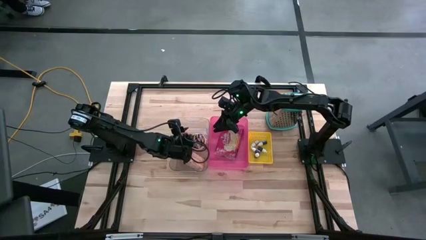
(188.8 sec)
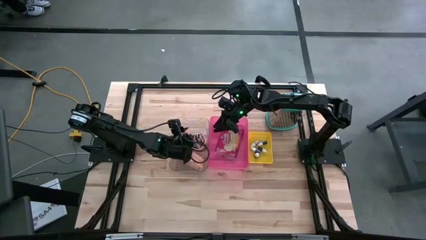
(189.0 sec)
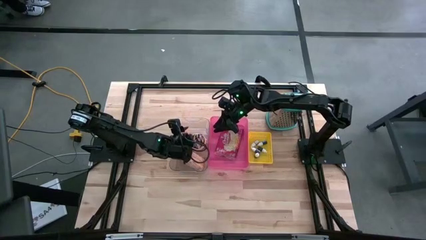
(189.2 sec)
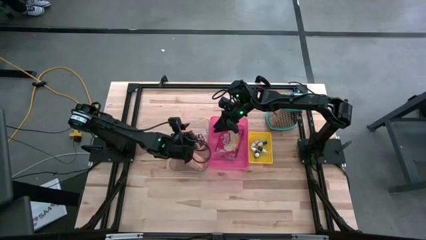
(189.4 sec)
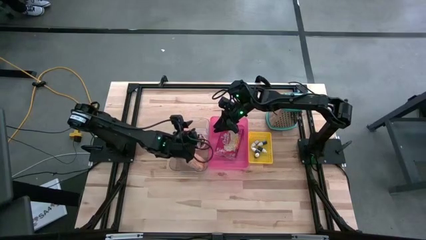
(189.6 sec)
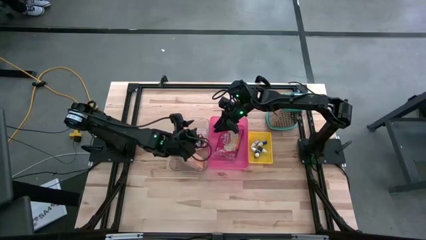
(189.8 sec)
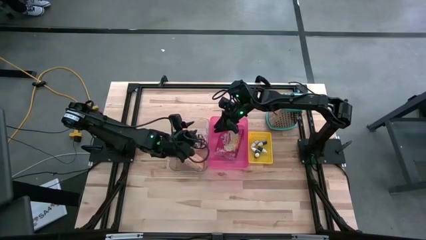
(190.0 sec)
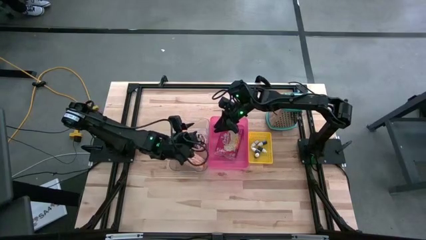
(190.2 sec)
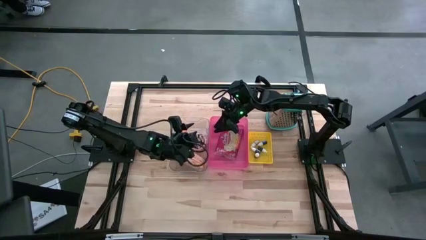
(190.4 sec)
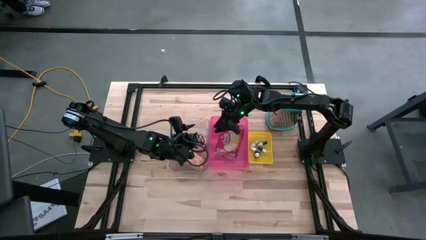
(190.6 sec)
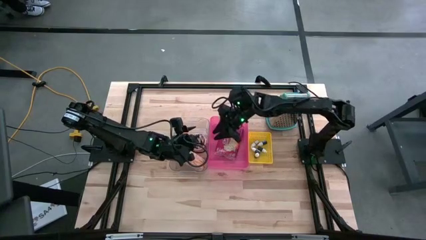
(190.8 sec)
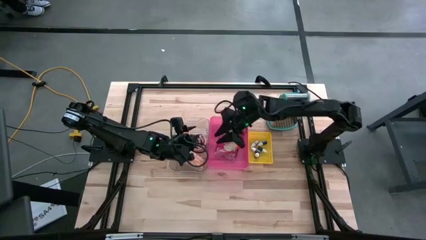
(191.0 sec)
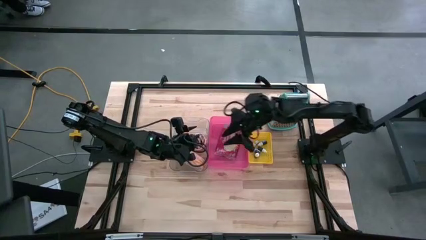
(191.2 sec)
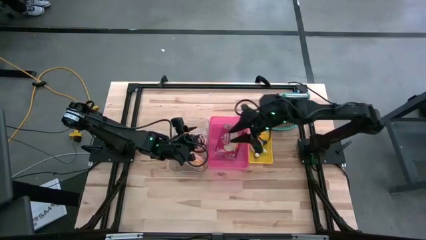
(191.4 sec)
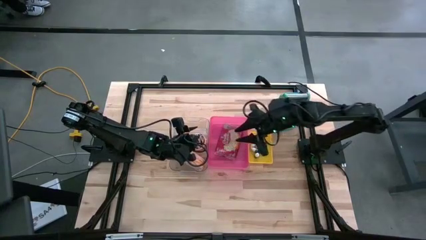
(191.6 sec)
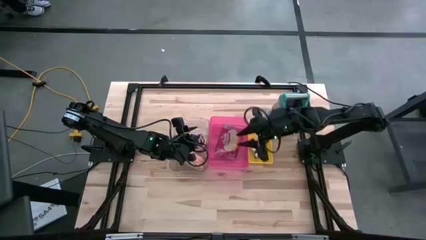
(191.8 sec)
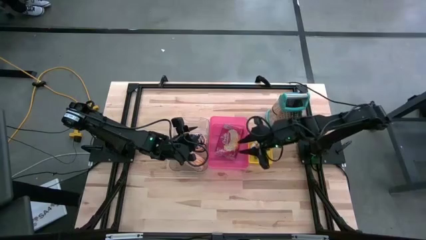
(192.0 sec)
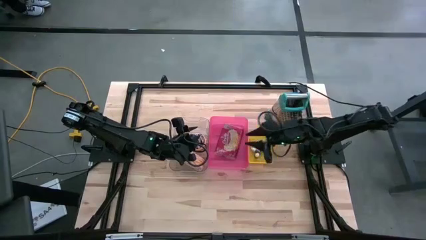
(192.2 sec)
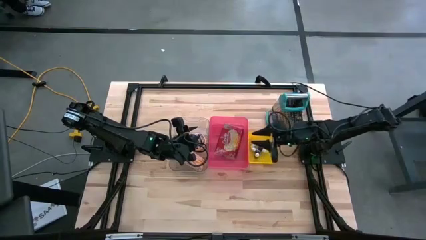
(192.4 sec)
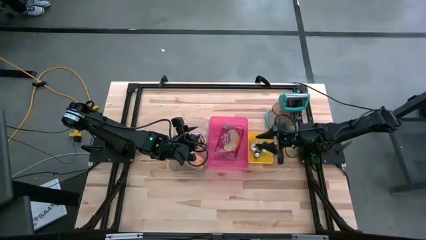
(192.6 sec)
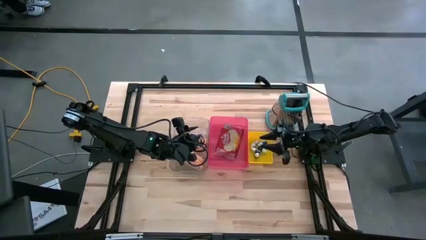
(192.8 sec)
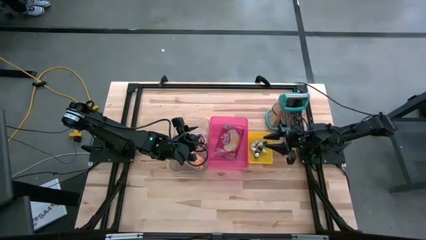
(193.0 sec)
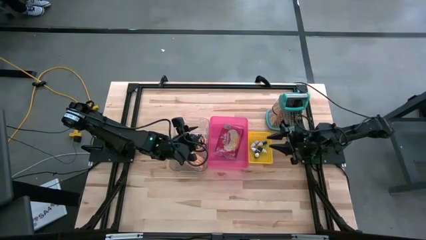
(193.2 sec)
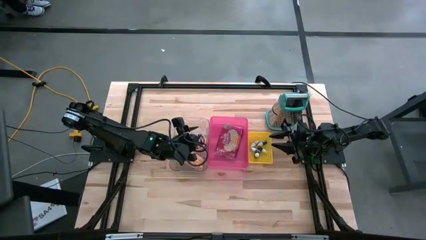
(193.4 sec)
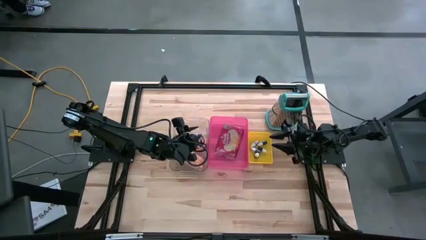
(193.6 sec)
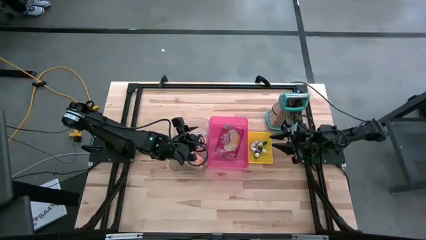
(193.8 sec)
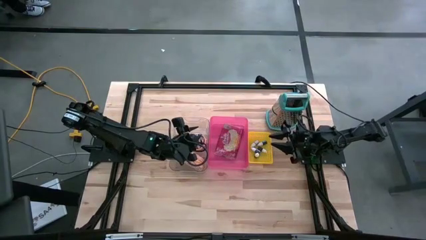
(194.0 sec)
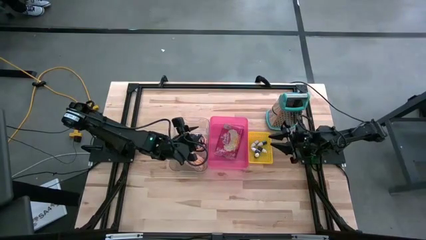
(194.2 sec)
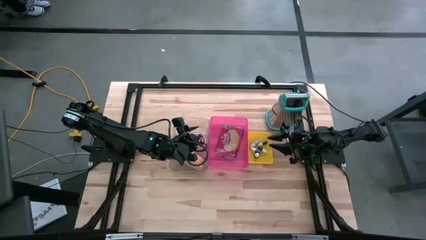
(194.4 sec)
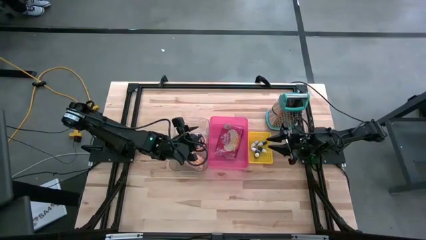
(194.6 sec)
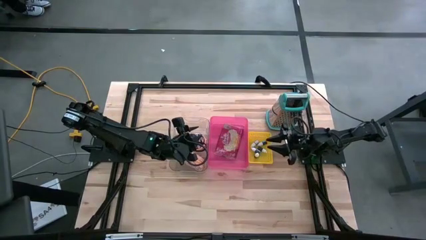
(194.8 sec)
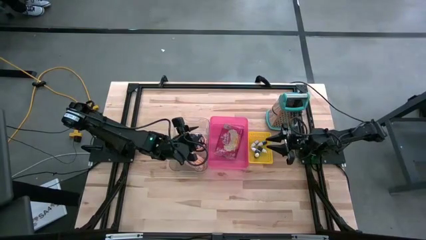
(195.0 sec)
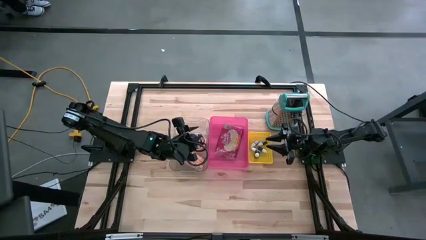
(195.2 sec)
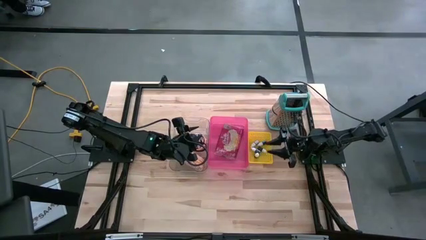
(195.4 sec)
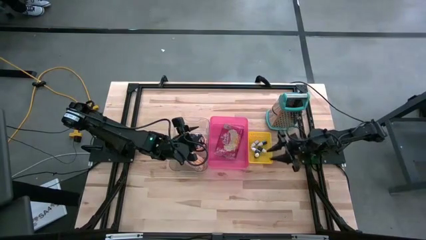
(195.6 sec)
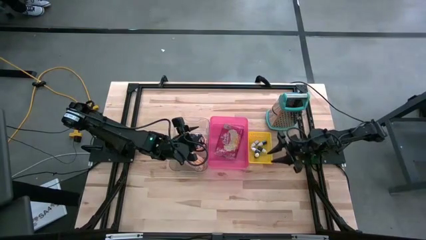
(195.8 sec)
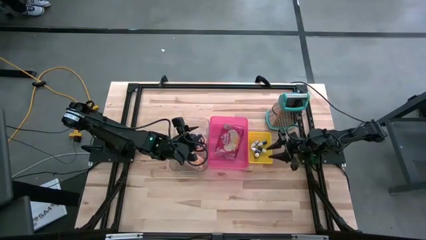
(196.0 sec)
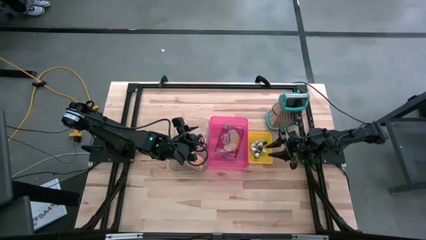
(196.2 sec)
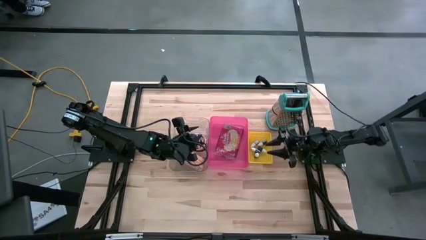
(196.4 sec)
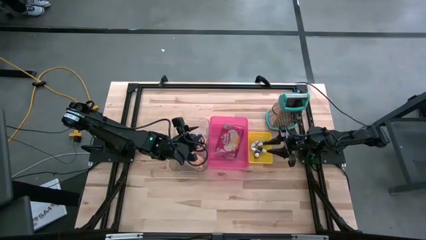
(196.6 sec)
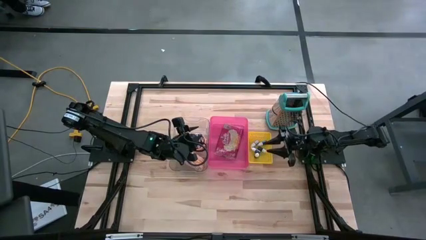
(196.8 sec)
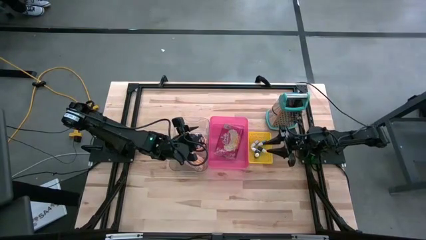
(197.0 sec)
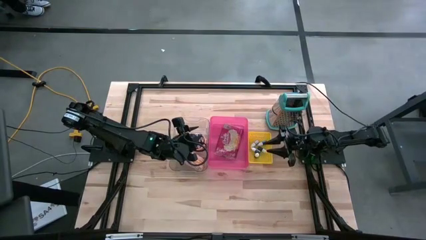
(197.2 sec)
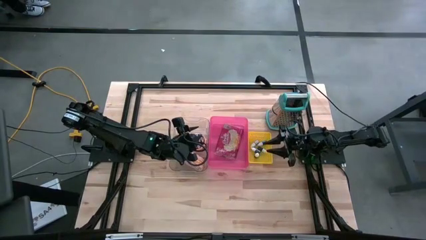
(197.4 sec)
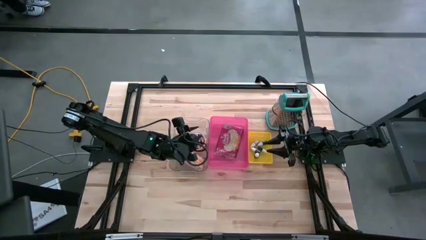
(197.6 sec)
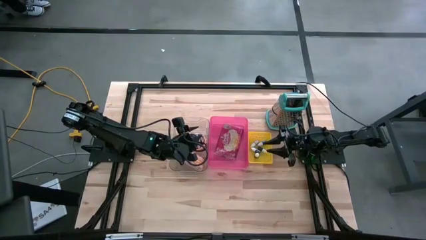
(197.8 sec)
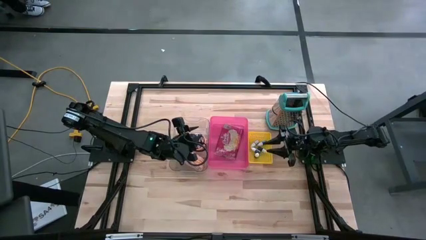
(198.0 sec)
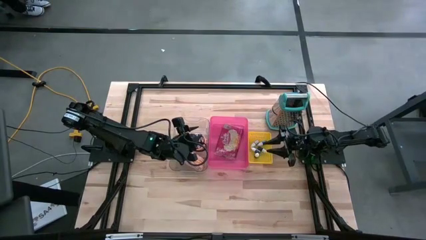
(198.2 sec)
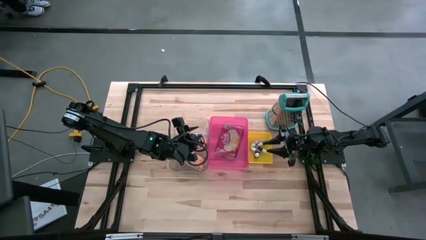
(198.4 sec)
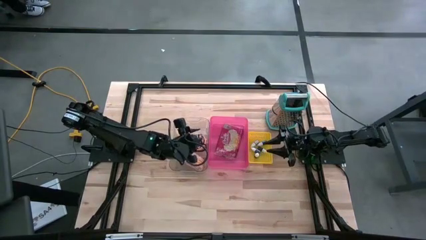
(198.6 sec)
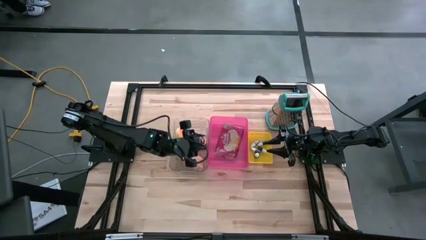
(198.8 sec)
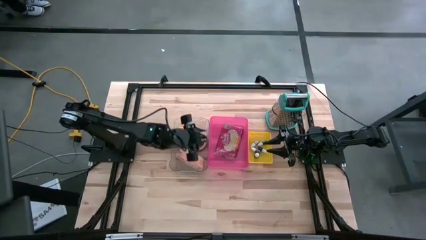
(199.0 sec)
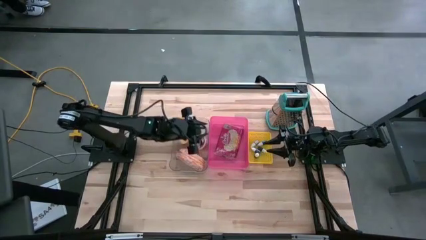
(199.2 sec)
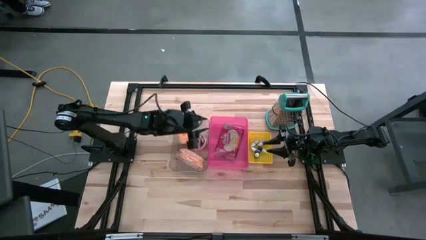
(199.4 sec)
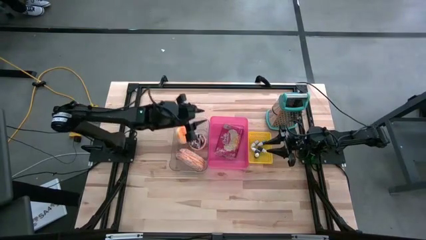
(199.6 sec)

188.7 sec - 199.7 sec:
Return to Home Position
